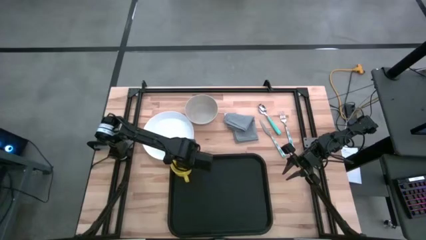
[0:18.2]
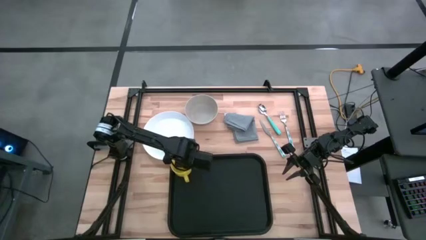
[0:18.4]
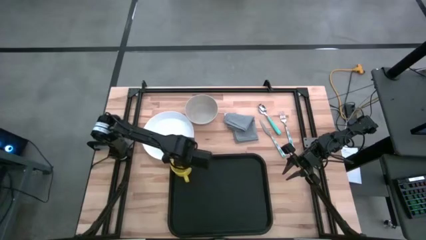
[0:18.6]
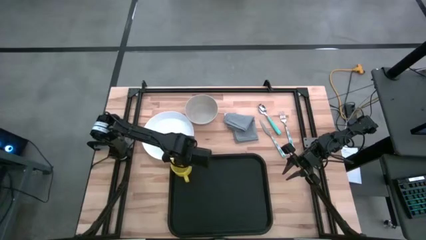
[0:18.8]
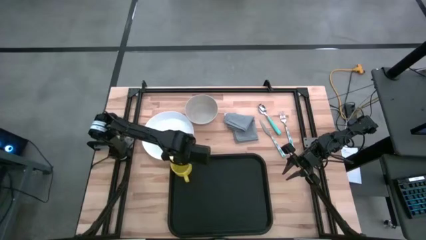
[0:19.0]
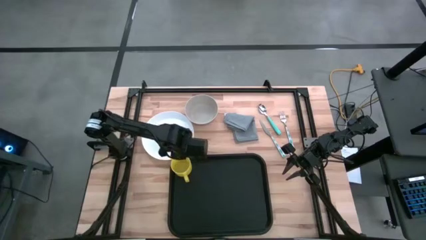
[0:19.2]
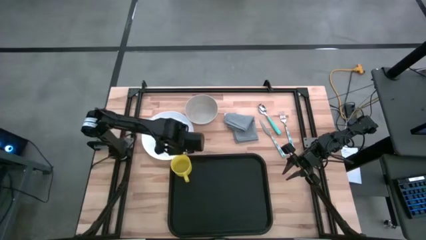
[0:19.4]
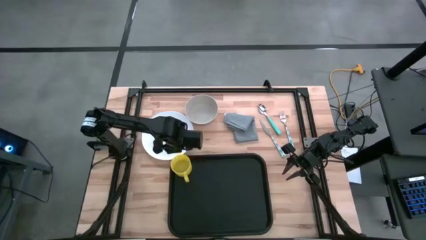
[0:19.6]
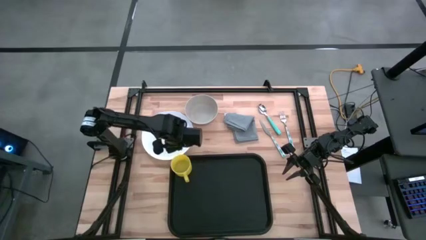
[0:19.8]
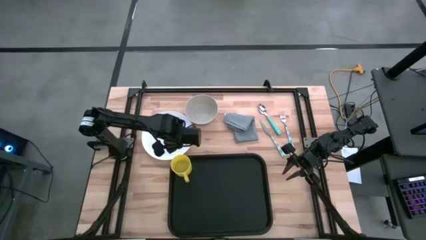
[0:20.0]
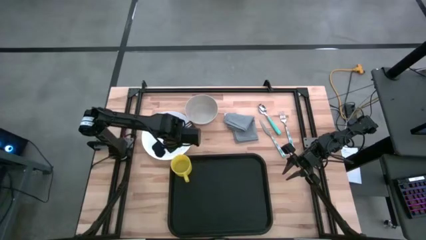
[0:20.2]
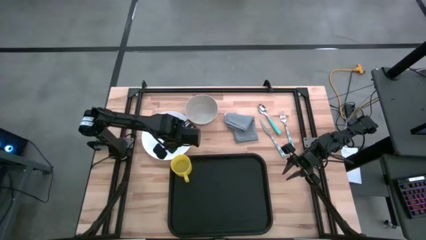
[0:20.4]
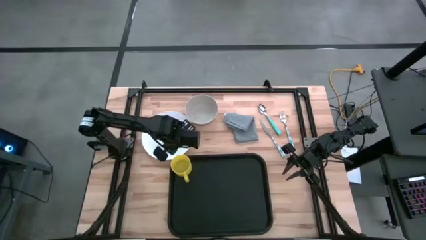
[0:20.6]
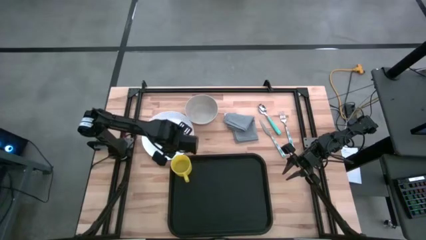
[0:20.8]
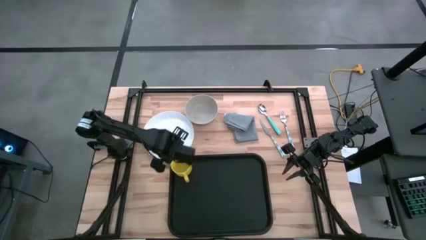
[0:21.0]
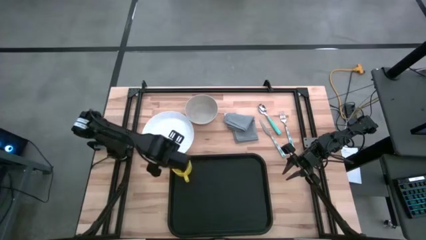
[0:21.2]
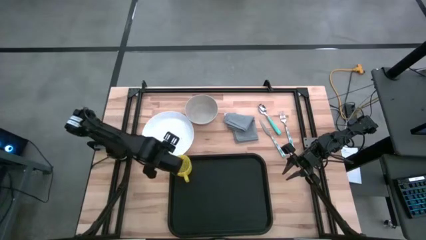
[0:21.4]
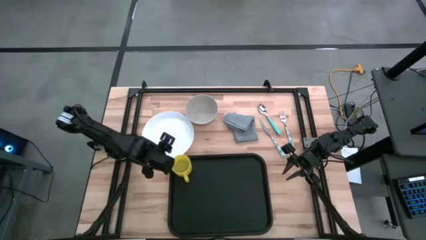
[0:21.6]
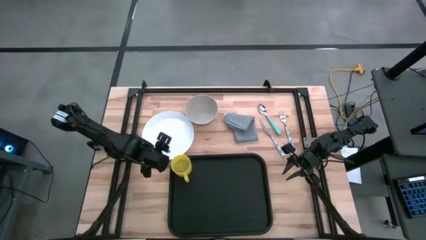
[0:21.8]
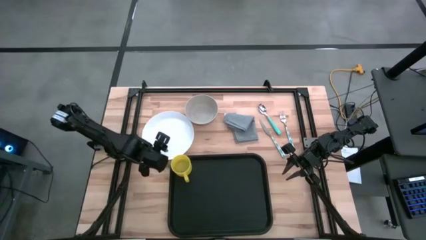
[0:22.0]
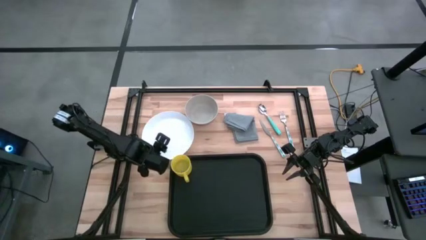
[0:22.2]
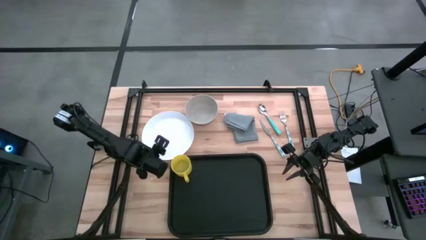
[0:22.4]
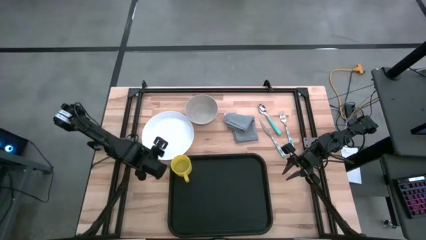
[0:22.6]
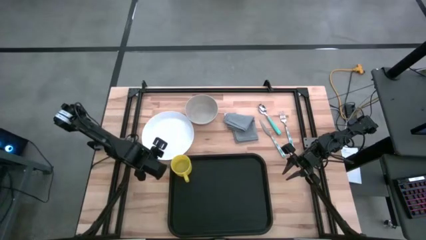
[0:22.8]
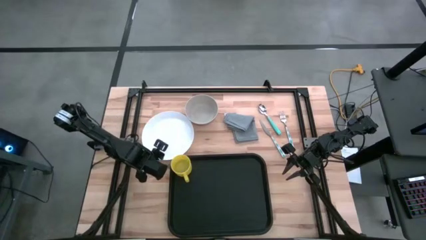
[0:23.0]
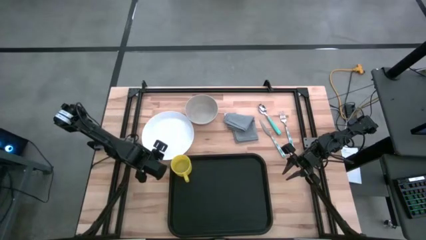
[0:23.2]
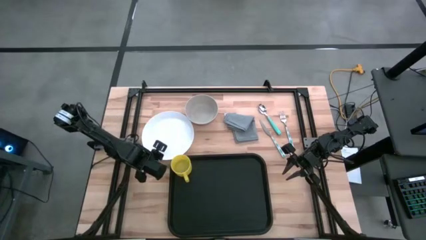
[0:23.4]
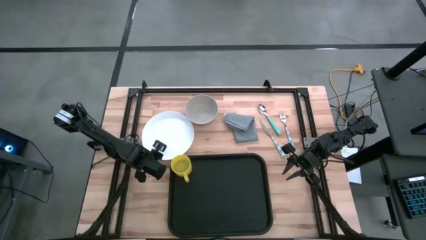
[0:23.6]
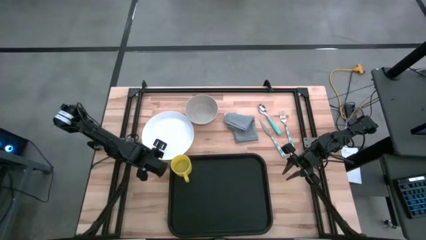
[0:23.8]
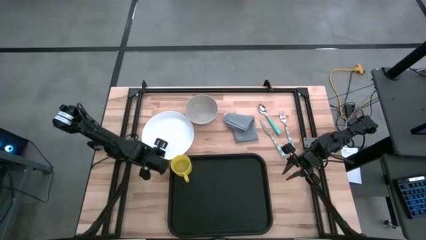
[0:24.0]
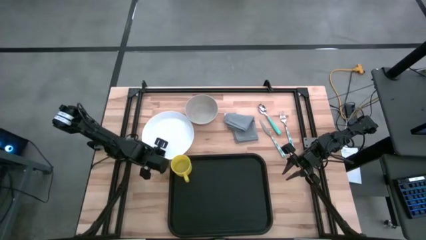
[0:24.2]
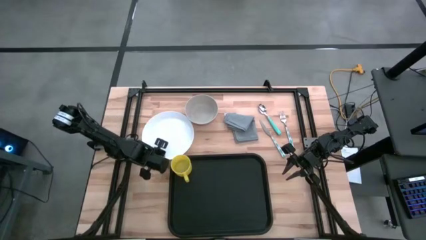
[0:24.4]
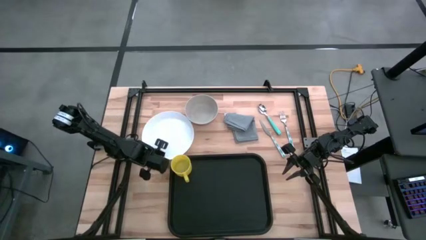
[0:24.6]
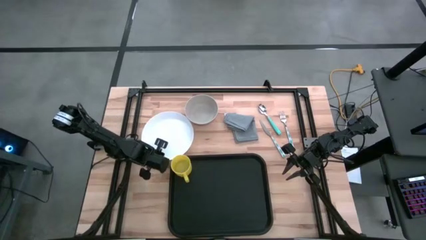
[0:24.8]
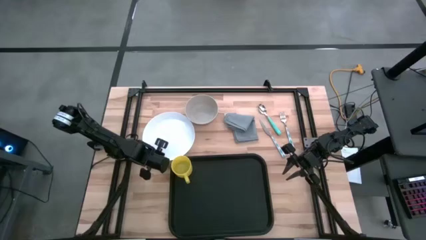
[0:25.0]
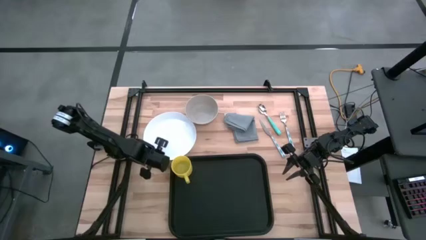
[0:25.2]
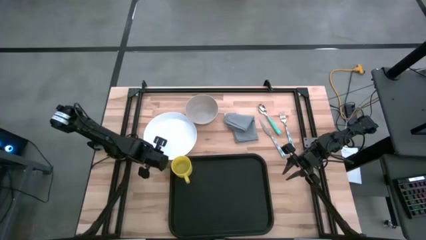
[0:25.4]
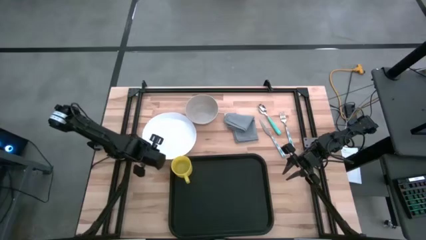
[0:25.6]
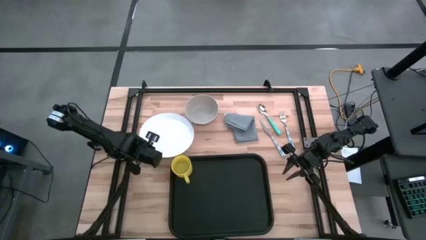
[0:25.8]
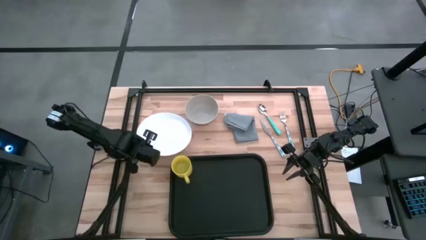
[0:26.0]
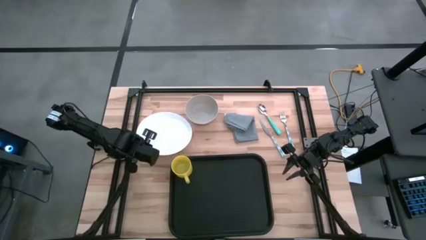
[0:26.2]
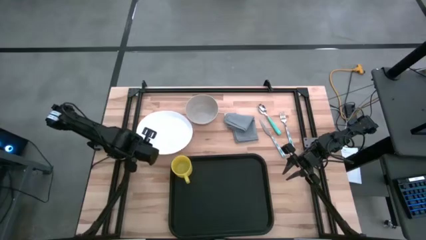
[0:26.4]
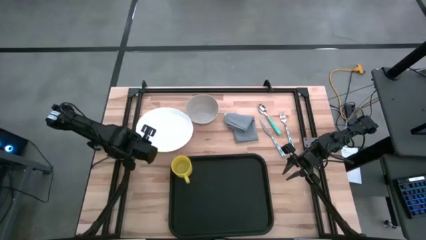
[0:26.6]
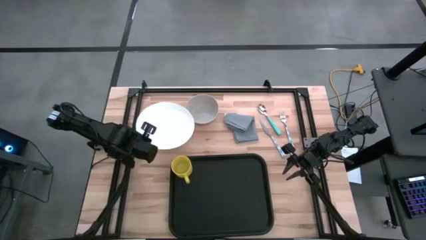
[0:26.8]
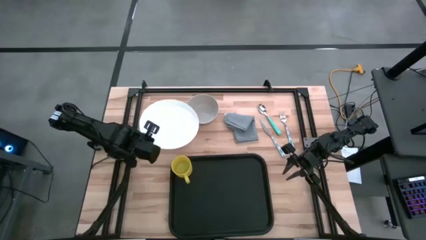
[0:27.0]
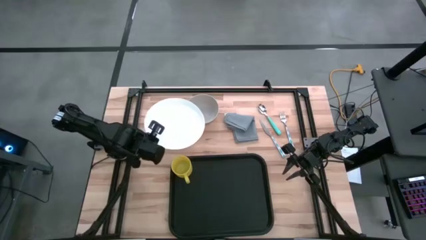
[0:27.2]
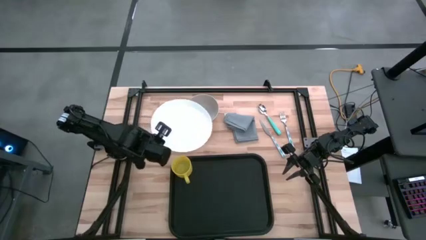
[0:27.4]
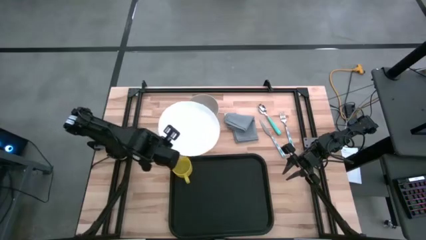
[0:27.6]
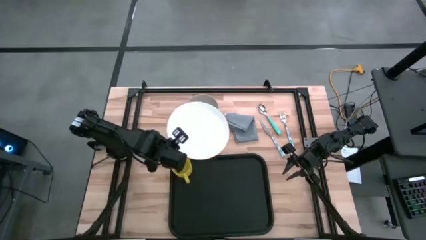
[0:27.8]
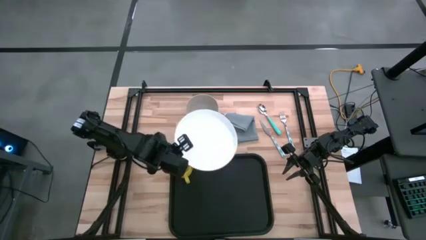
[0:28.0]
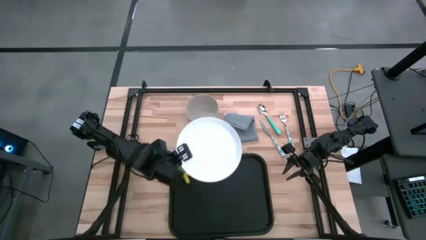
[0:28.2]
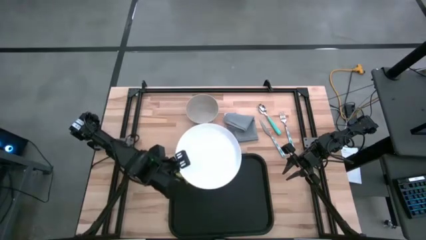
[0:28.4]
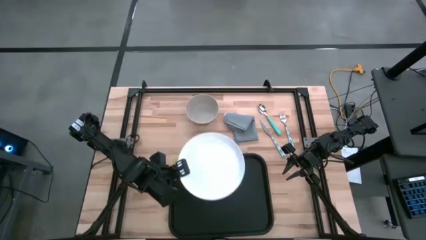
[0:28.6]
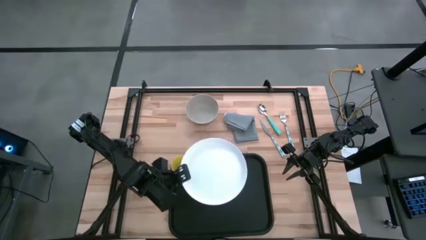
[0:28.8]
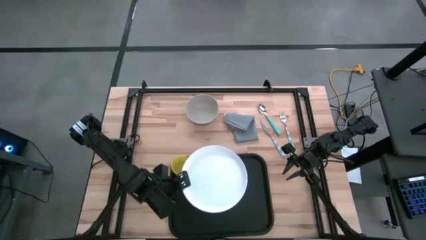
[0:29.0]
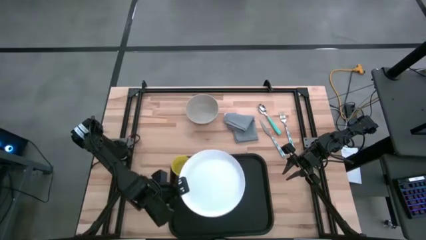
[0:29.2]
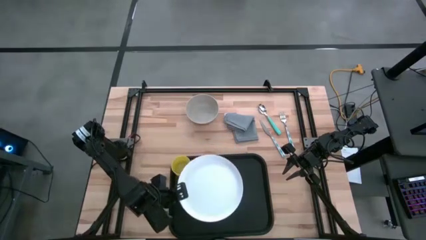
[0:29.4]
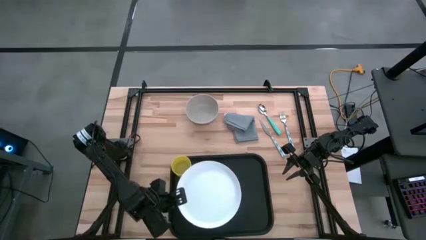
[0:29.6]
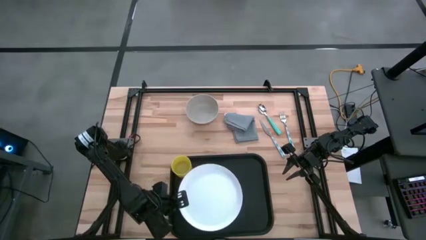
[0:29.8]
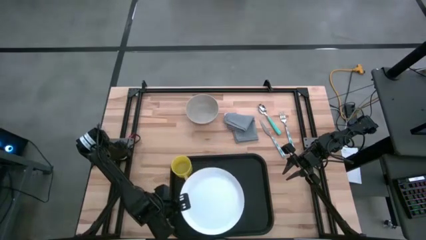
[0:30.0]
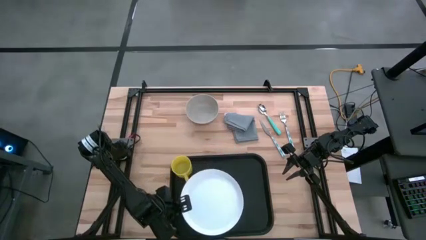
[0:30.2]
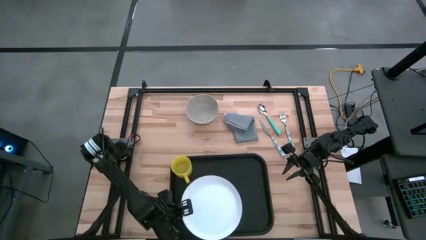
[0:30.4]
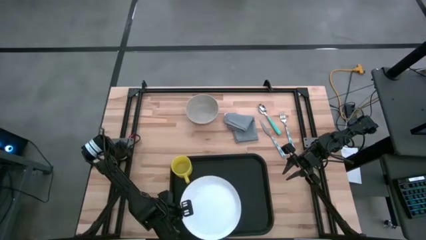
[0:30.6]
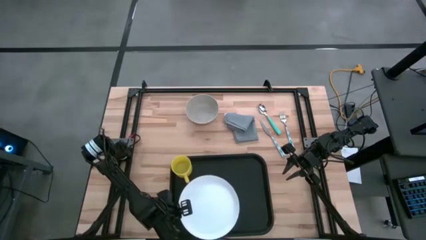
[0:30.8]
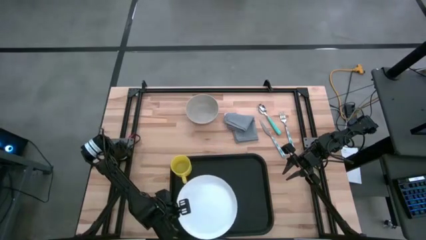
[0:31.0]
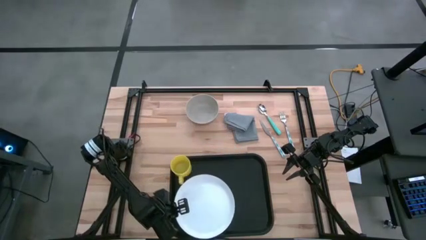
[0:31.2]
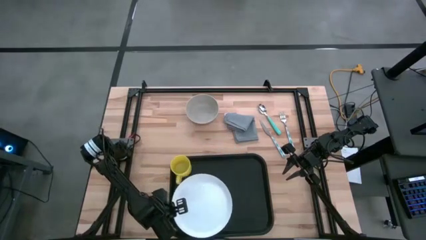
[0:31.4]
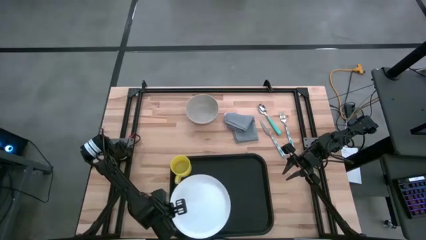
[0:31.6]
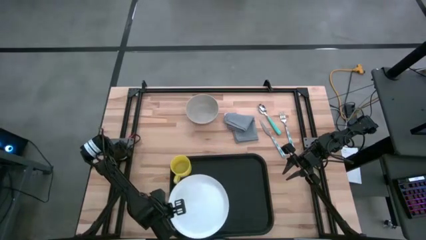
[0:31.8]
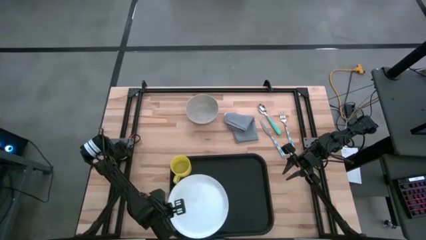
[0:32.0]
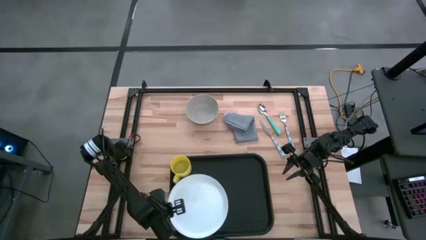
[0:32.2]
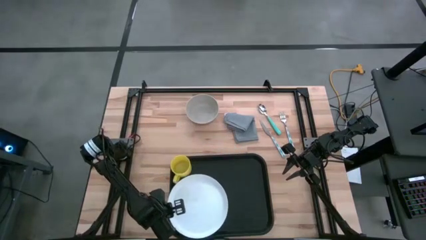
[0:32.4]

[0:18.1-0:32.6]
Task: Set up tray
Put the white plate under the yellow mug on the black serving tray

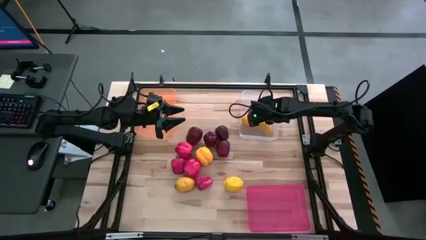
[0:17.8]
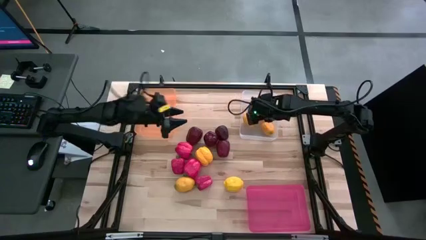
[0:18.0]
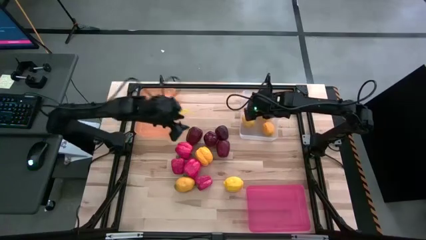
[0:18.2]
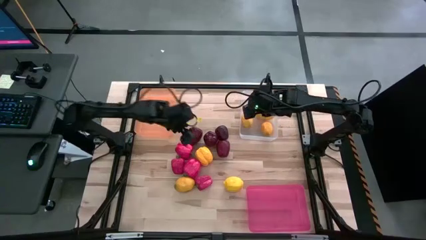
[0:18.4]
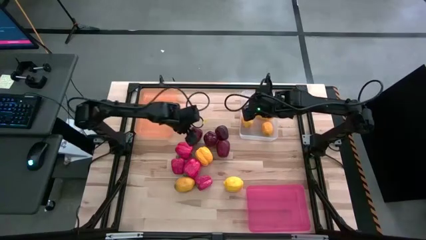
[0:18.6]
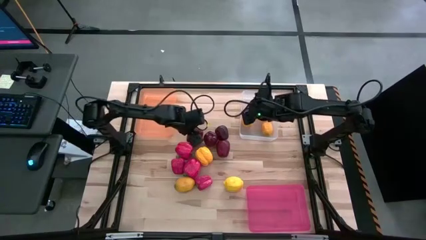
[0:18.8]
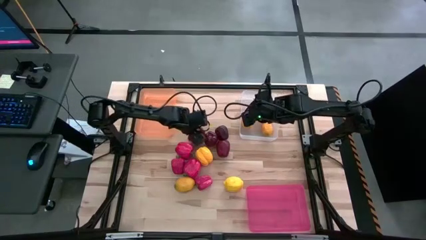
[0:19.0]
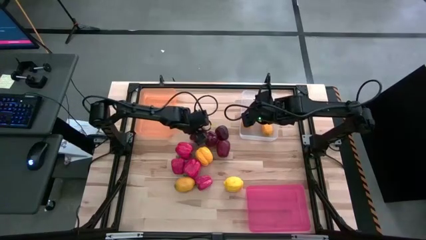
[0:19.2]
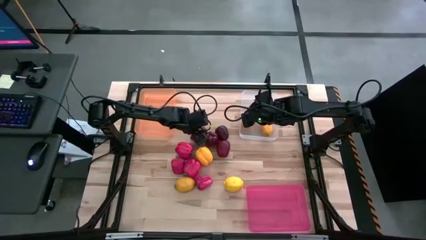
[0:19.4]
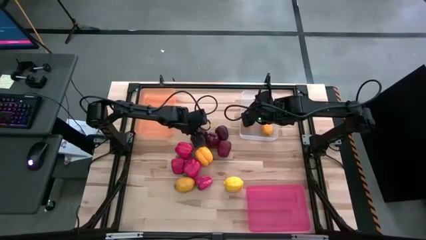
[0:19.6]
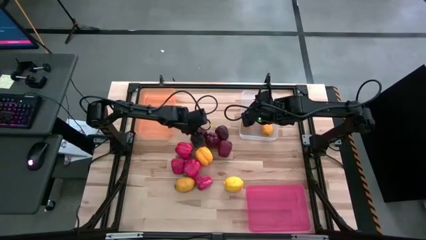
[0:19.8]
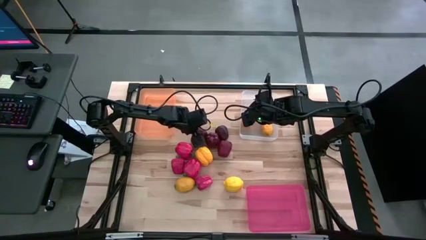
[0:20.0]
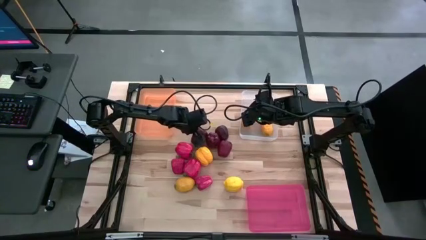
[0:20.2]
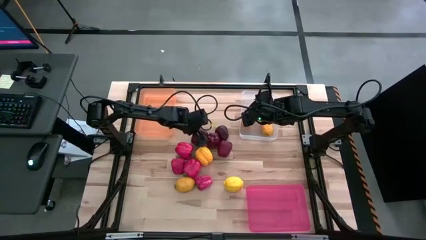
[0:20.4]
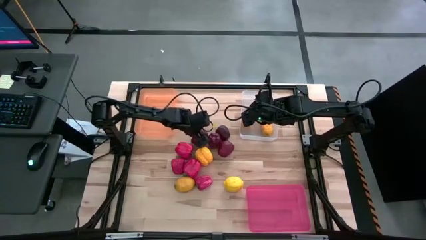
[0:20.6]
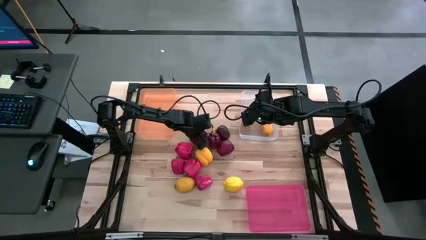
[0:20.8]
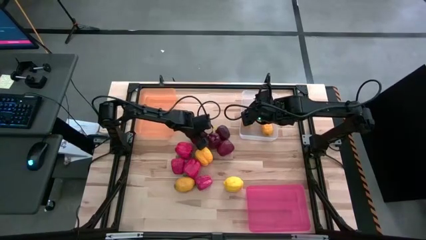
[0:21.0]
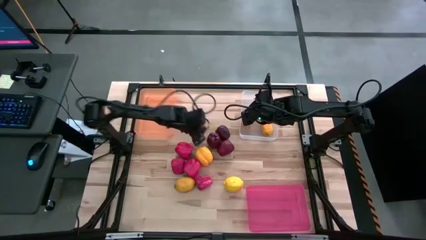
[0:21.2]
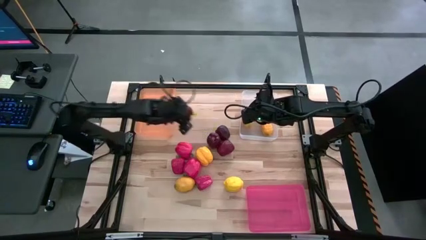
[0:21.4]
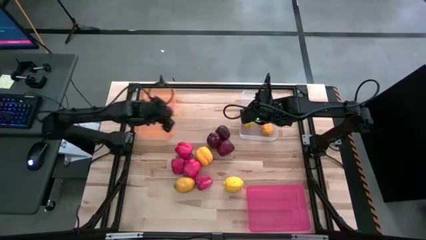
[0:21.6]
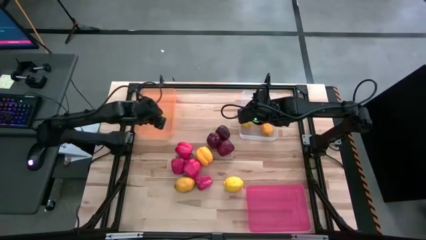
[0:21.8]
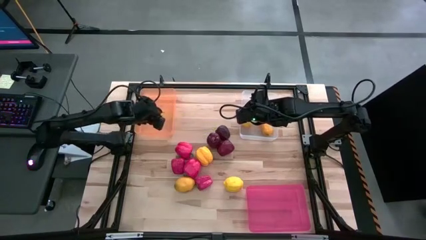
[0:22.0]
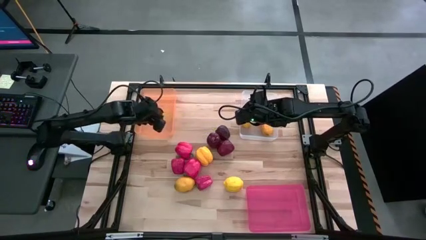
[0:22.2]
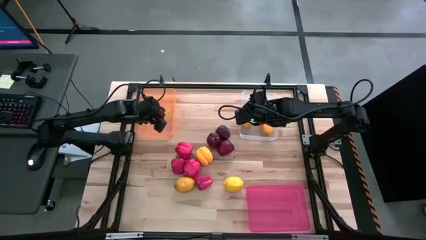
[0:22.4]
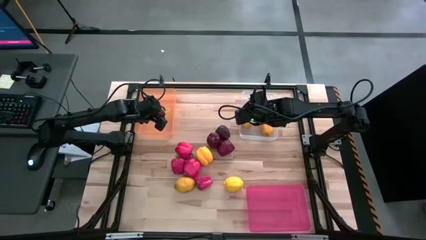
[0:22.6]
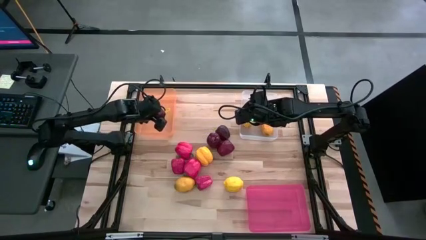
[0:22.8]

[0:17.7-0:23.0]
Task: Sort produce into baskets
Put the apple into the orange bin
